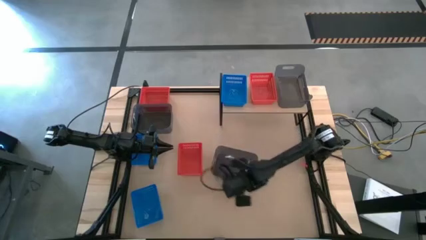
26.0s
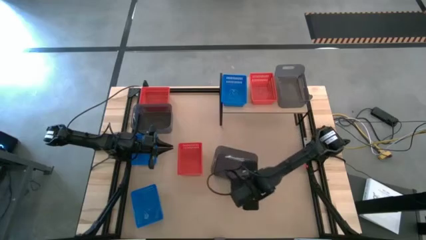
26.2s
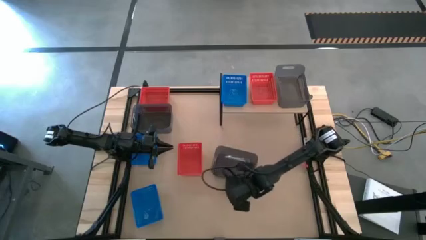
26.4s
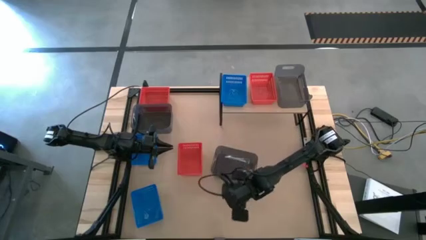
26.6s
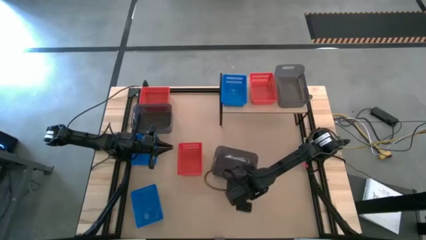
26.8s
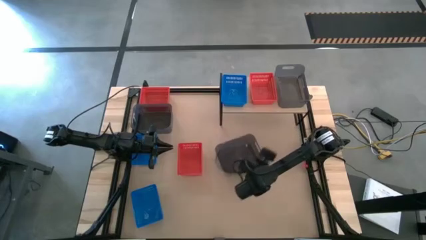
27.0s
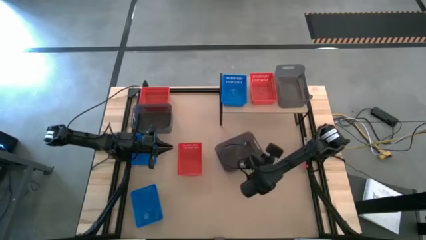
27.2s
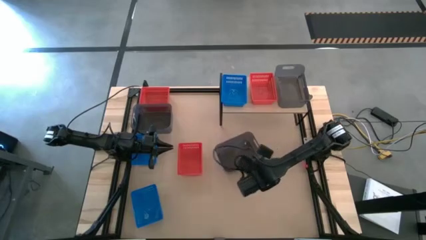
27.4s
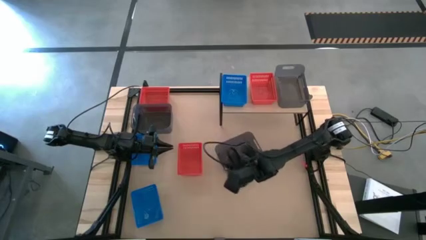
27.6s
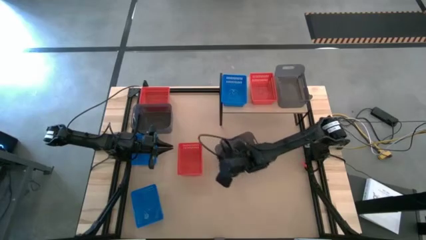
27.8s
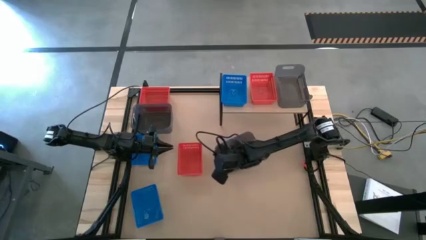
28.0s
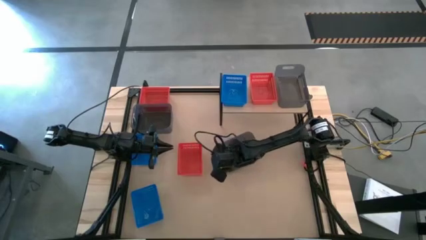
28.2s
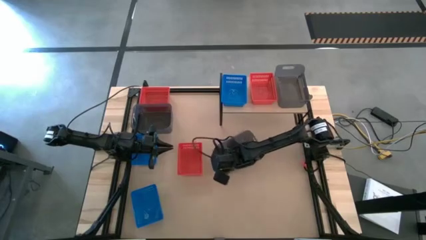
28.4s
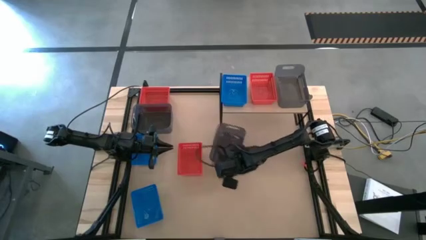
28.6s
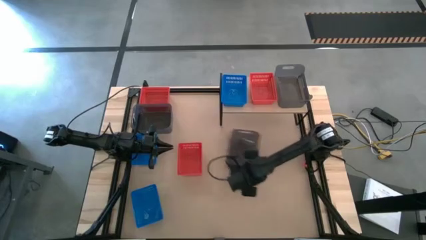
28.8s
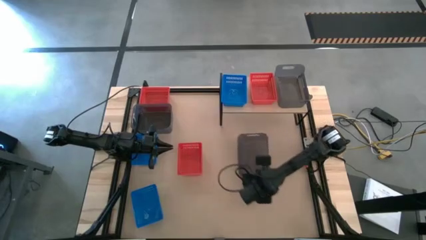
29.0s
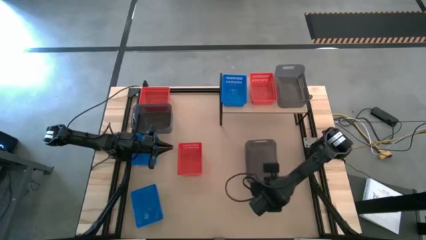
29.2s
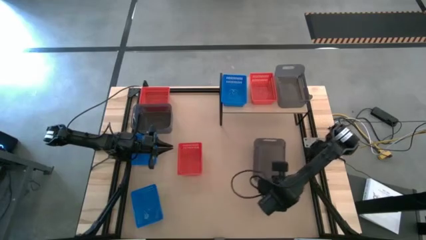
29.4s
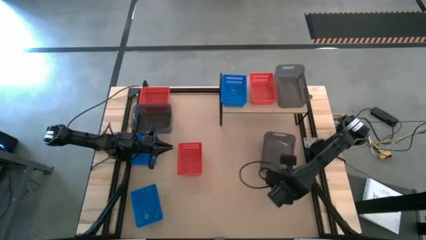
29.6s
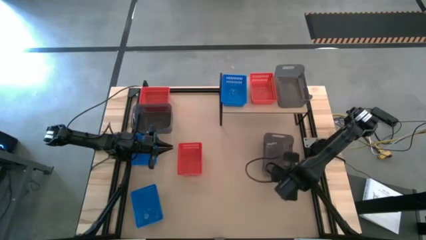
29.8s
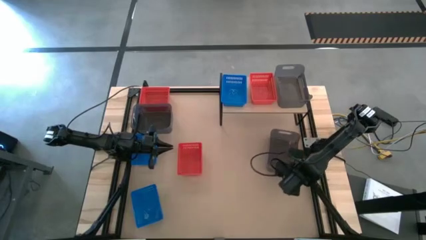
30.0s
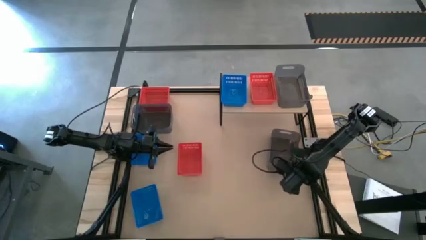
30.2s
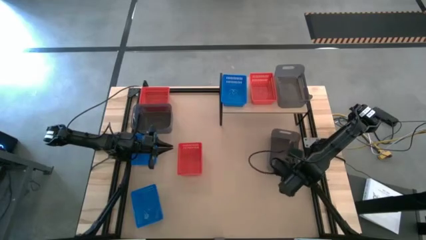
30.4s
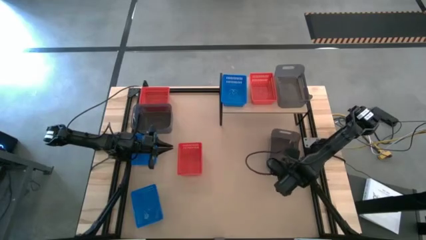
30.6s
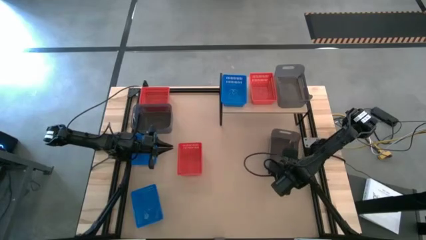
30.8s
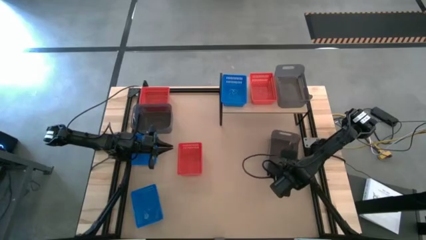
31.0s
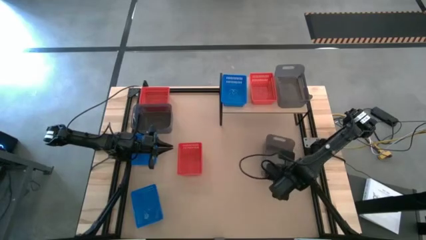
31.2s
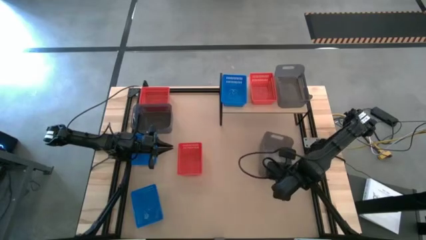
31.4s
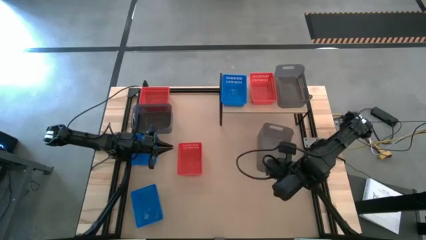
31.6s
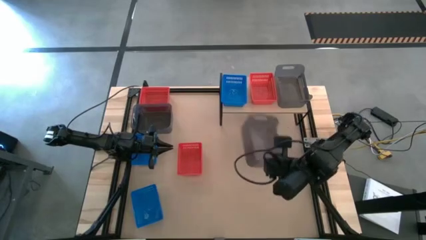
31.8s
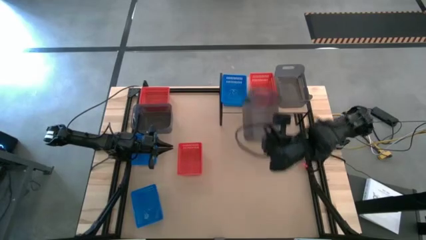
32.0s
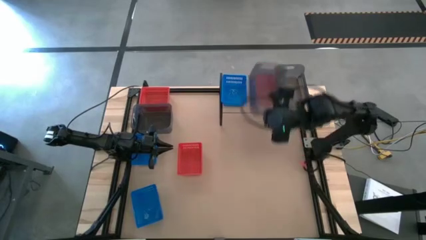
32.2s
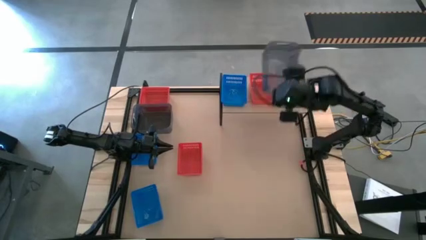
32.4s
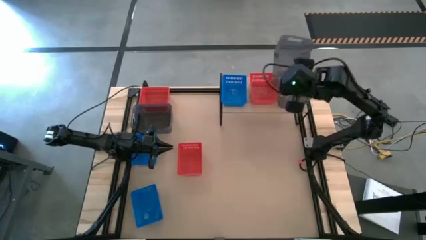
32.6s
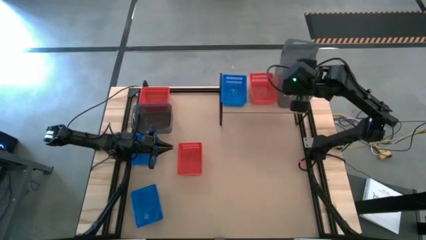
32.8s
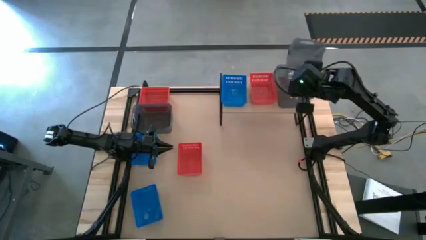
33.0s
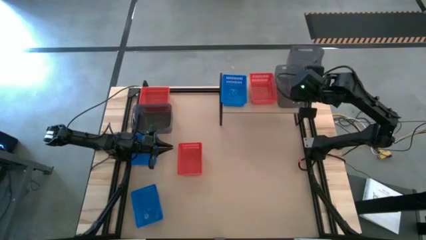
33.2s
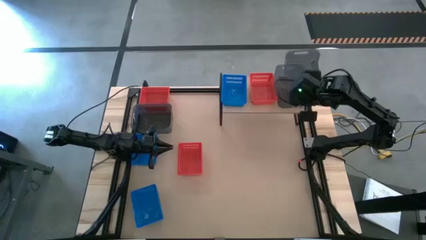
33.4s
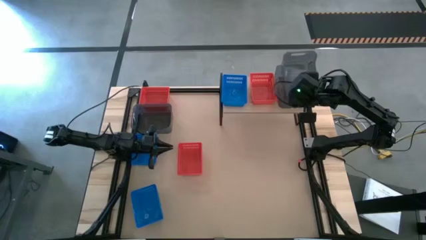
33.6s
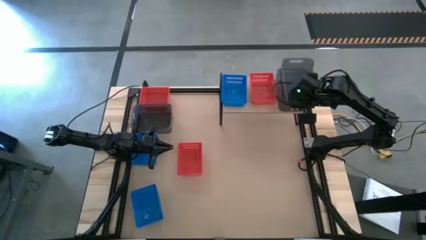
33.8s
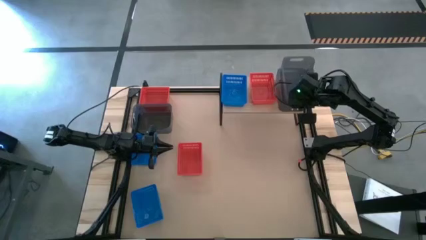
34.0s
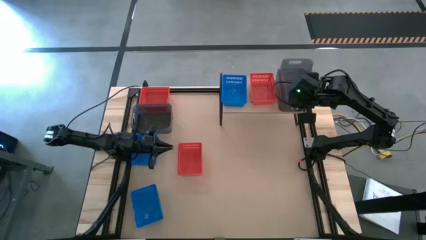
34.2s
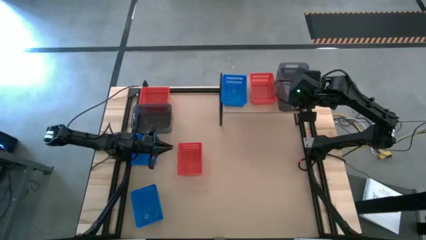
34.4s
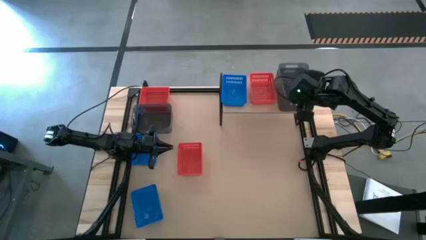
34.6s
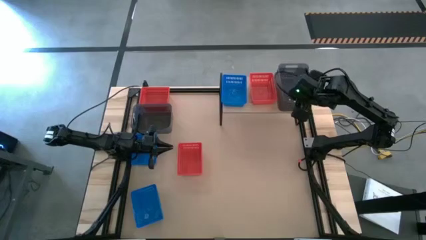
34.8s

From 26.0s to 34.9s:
Task: Stack baskets on shelf by color
Stack the right black bin on the other black bin on the shelf

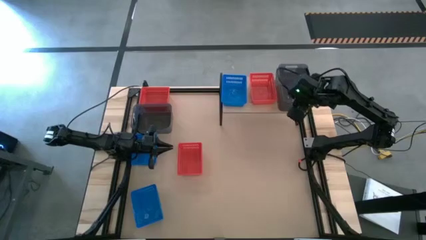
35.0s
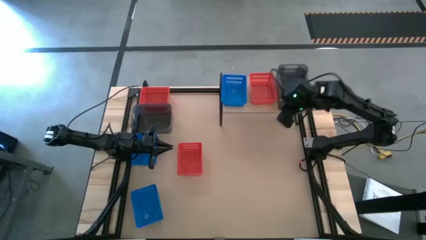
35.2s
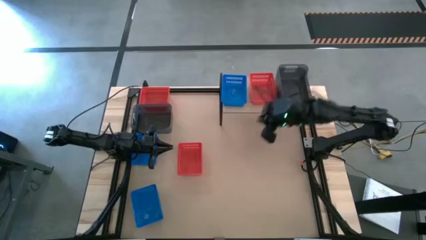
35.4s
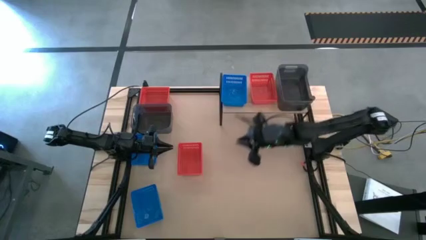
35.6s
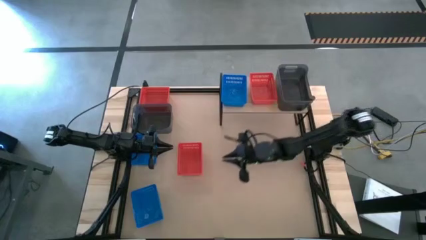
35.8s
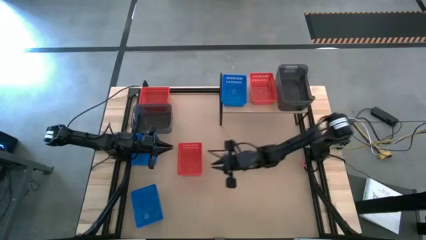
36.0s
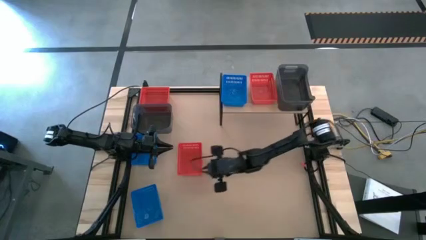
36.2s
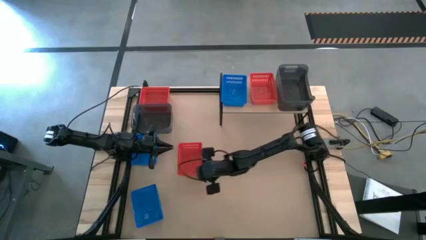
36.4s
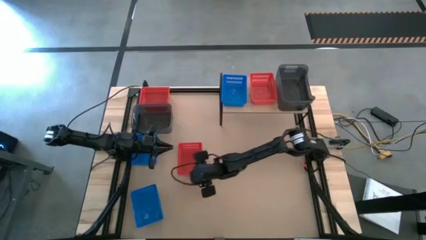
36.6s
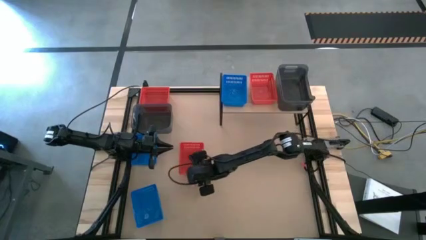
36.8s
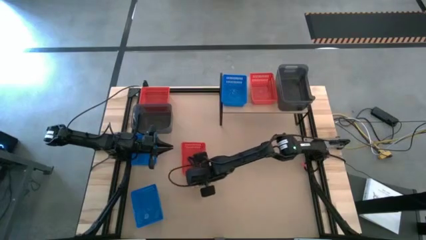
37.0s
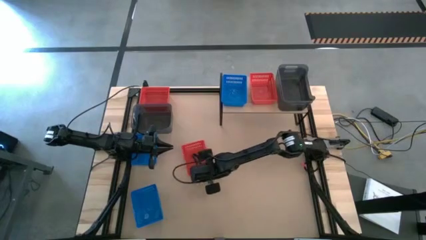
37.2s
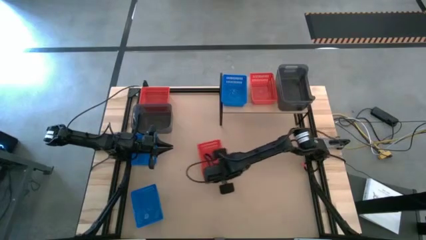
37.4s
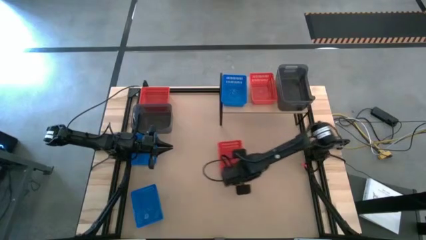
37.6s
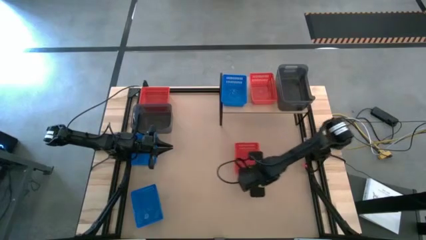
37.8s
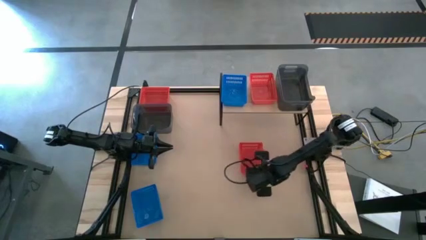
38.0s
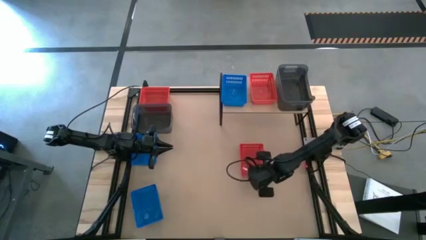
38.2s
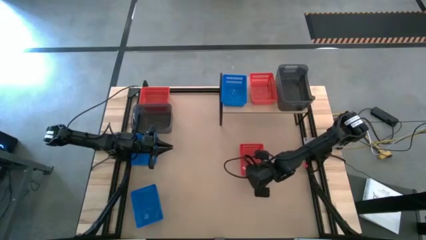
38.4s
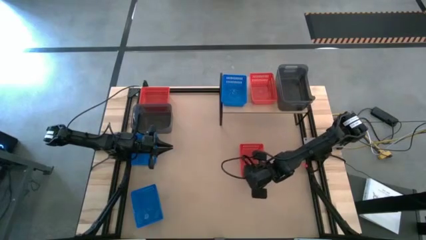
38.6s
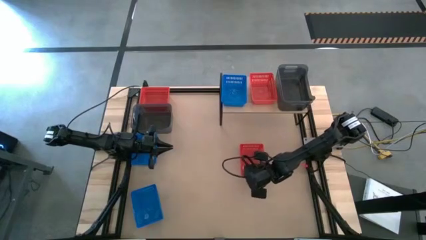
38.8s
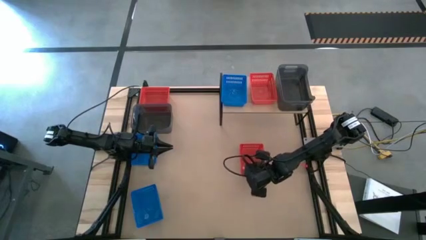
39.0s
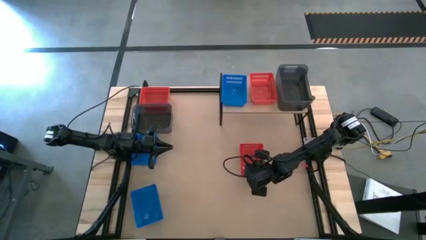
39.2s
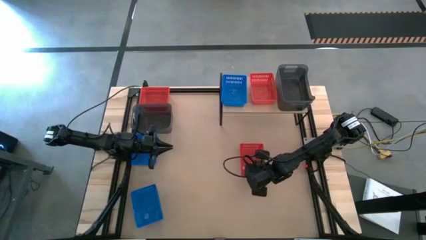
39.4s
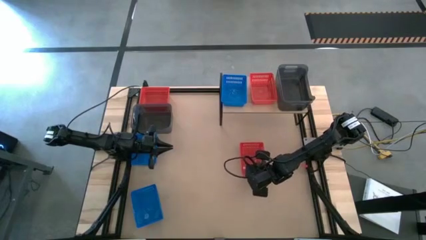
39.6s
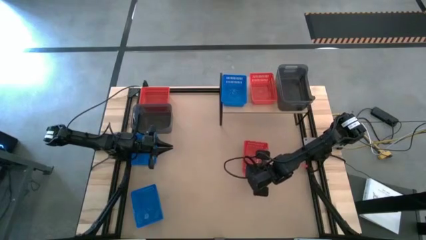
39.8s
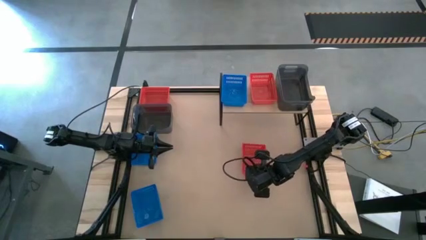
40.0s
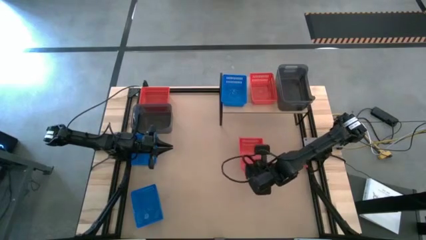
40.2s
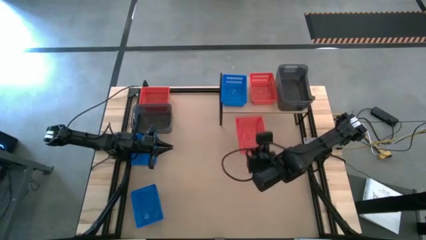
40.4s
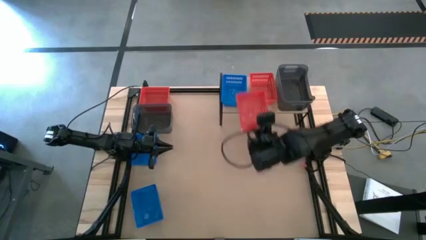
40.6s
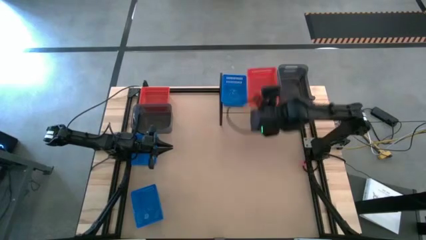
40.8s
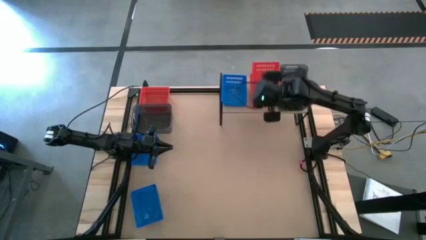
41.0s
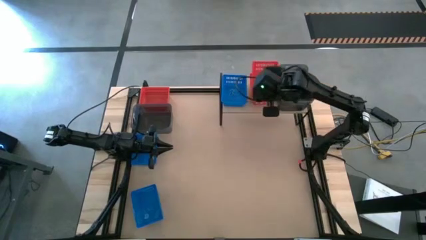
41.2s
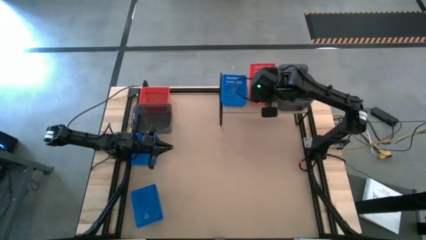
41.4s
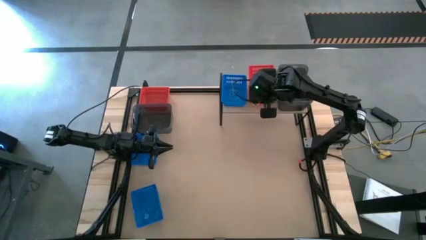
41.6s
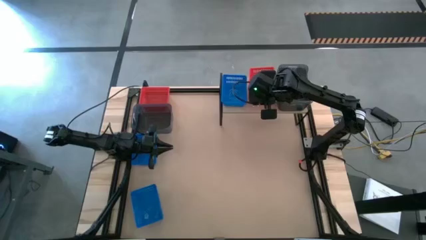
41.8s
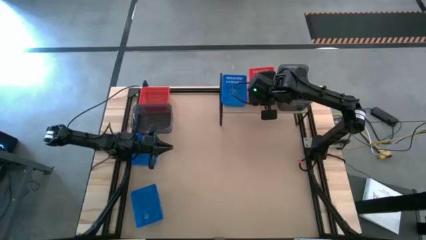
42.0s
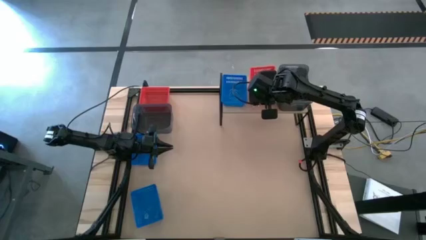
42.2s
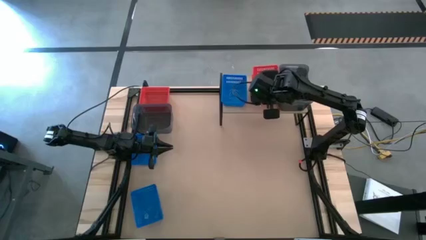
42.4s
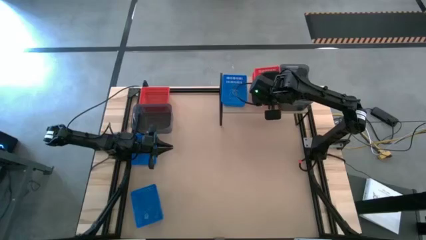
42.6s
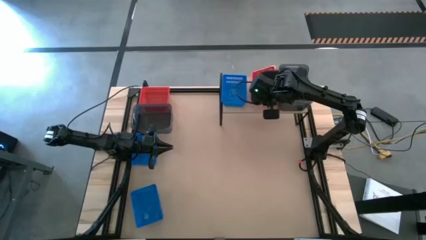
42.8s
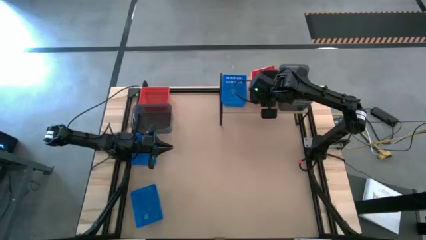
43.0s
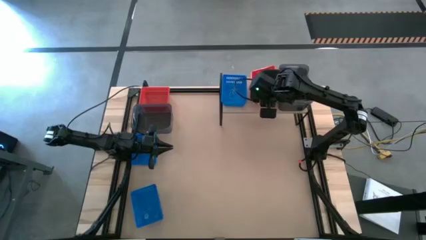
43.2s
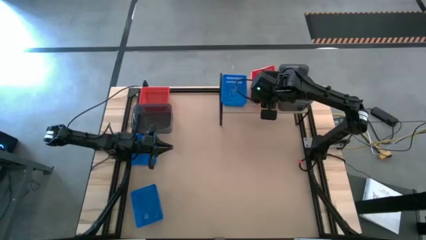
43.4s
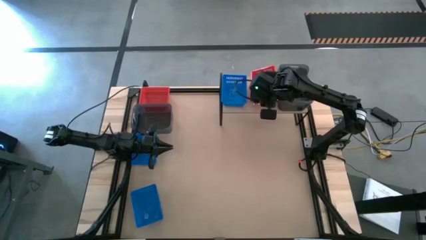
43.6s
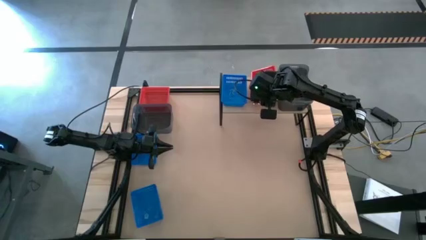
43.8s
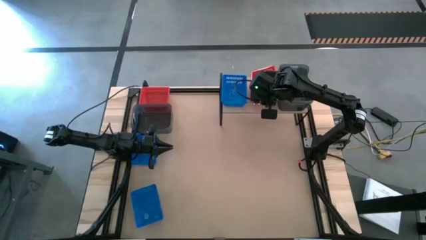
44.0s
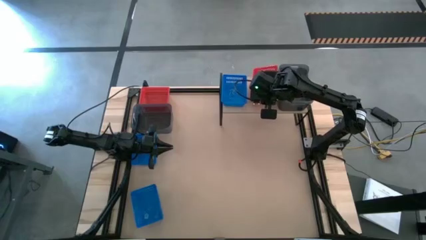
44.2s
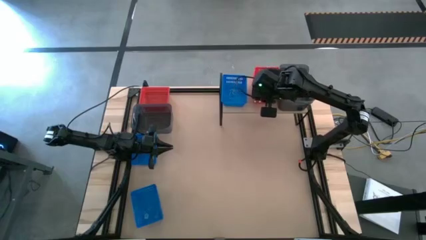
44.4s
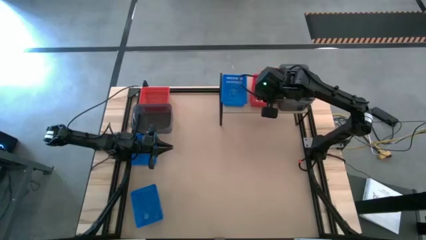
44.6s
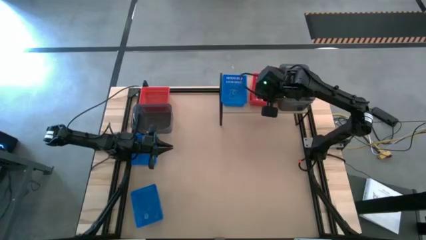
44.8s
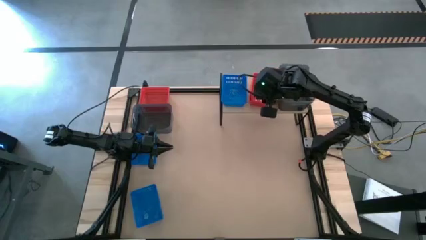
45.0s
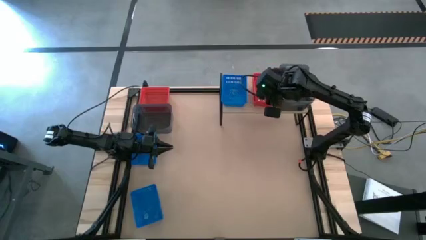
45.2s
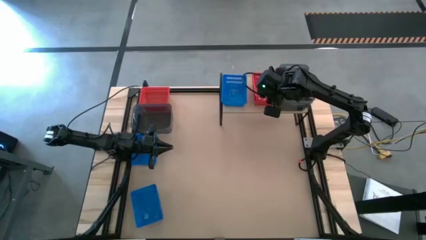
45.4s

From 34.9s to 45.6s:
Stack the bottom red bin on the other red bin on the shelf
